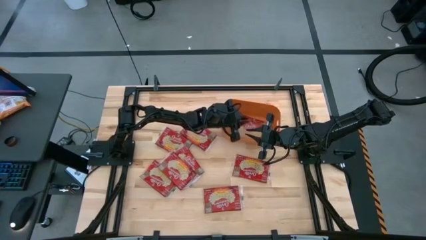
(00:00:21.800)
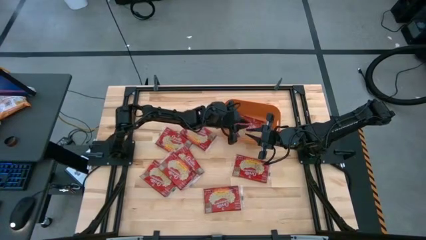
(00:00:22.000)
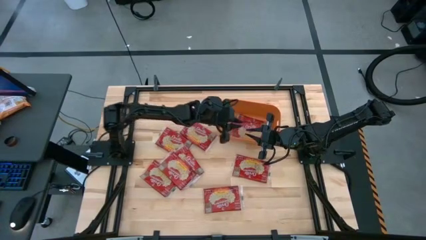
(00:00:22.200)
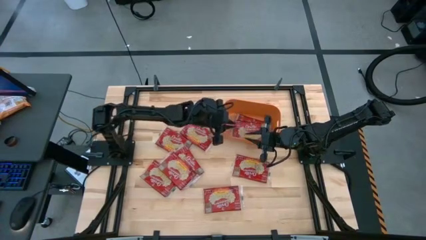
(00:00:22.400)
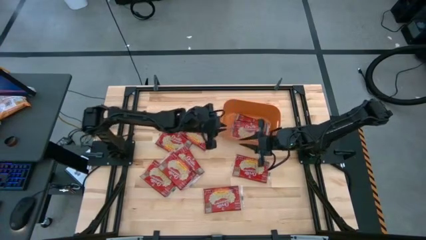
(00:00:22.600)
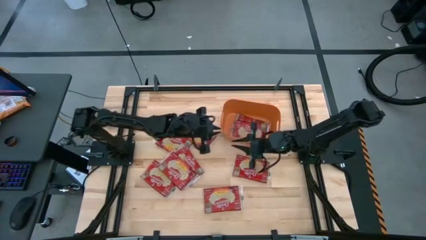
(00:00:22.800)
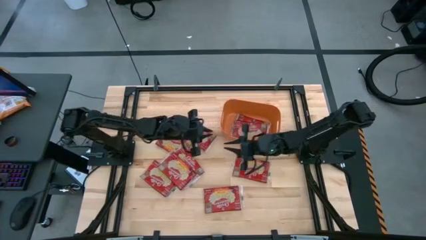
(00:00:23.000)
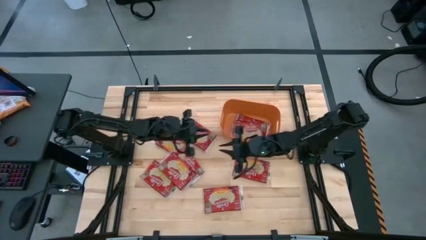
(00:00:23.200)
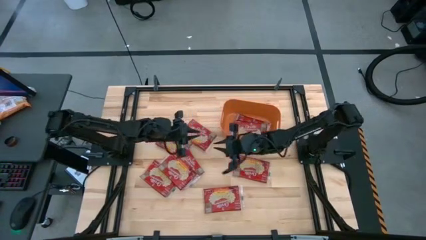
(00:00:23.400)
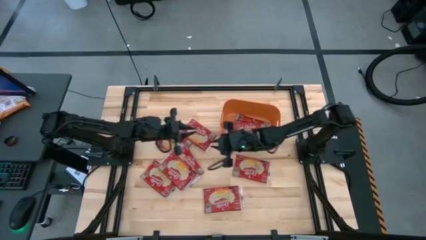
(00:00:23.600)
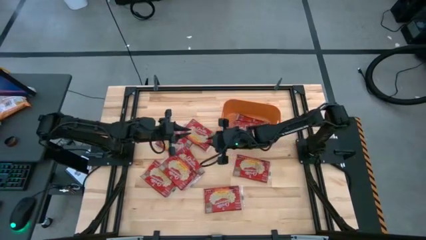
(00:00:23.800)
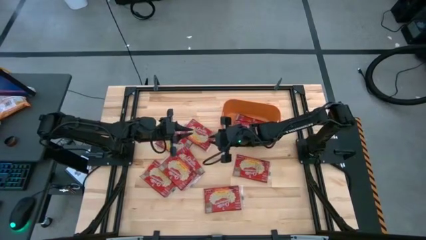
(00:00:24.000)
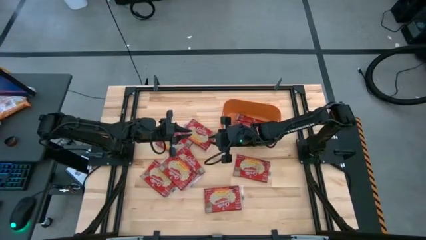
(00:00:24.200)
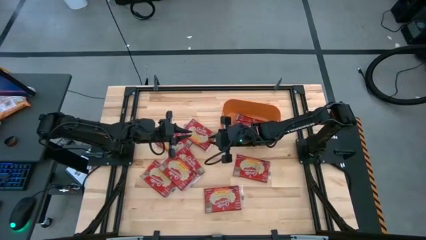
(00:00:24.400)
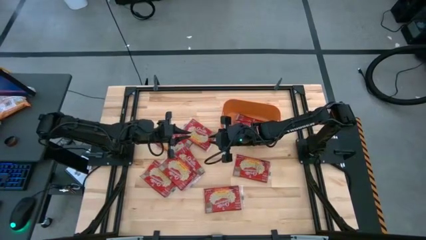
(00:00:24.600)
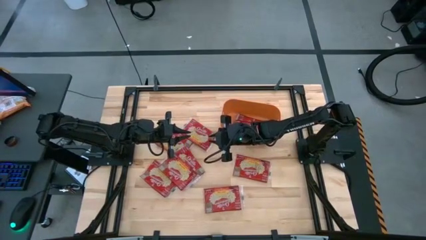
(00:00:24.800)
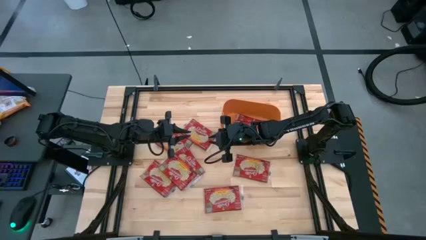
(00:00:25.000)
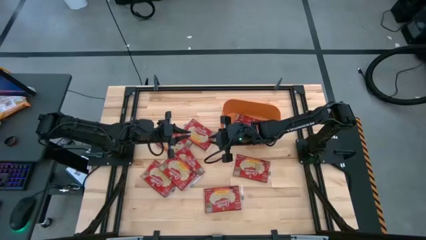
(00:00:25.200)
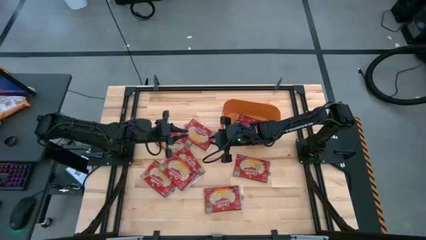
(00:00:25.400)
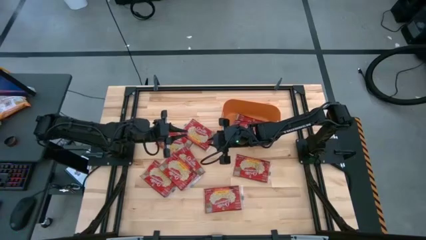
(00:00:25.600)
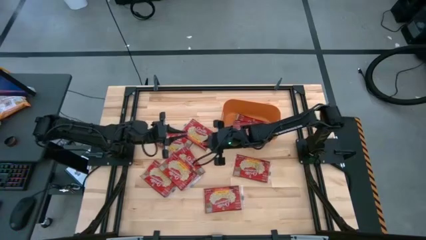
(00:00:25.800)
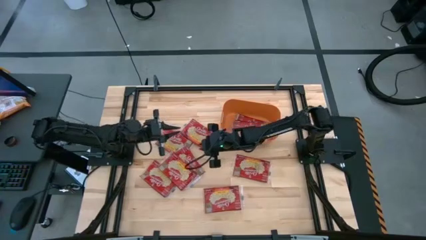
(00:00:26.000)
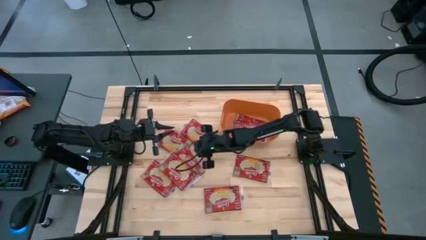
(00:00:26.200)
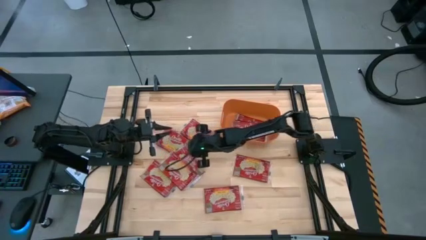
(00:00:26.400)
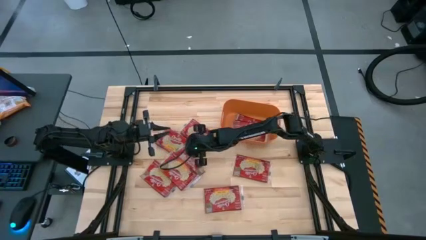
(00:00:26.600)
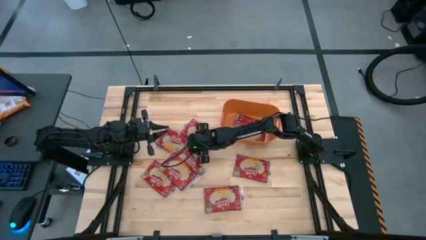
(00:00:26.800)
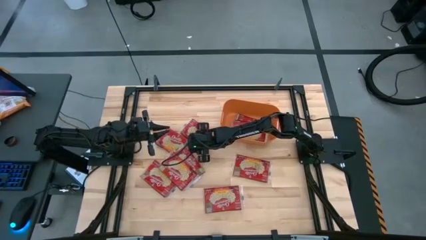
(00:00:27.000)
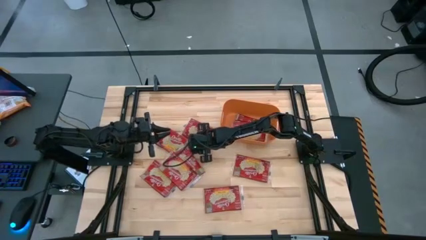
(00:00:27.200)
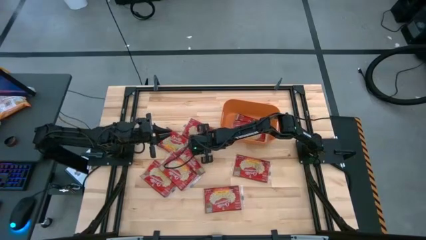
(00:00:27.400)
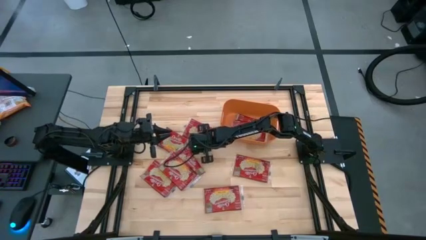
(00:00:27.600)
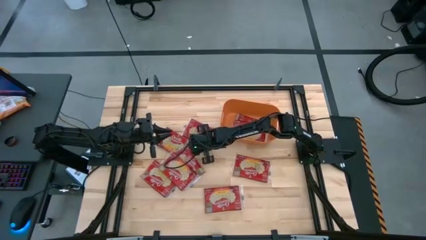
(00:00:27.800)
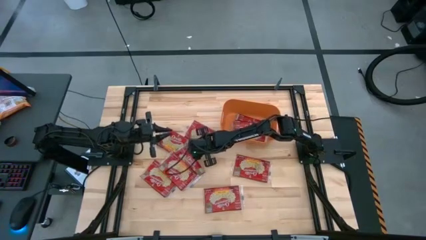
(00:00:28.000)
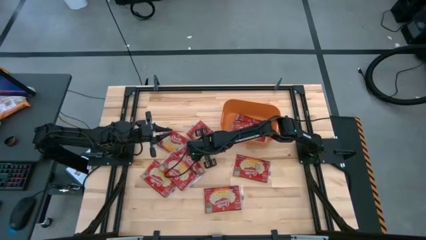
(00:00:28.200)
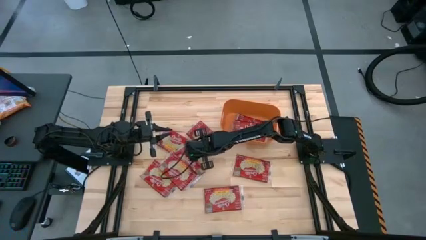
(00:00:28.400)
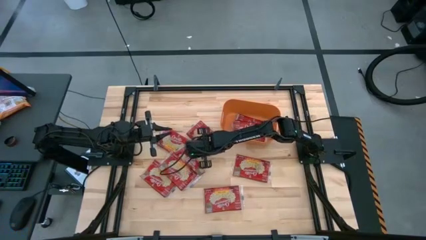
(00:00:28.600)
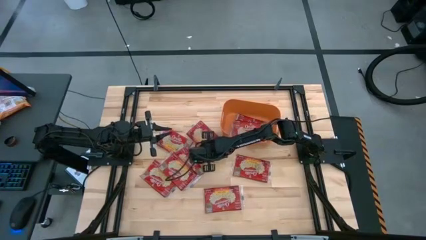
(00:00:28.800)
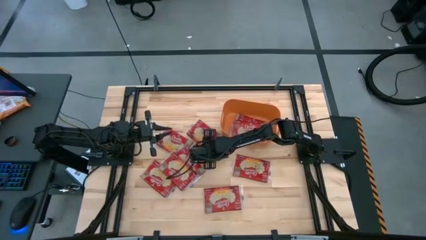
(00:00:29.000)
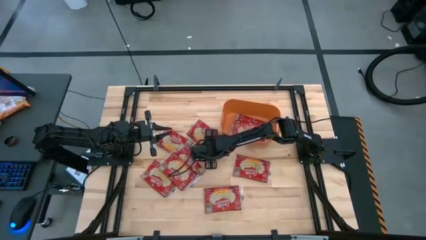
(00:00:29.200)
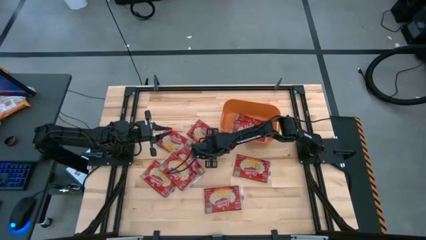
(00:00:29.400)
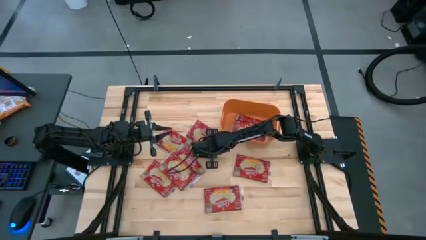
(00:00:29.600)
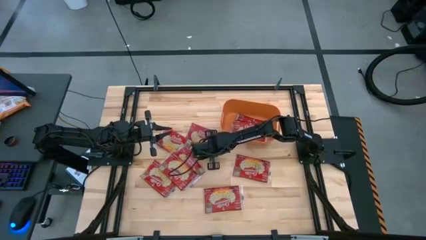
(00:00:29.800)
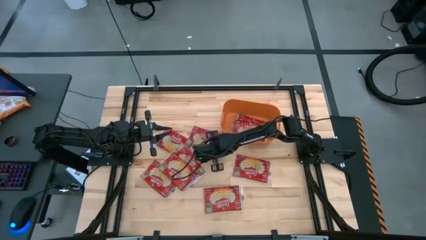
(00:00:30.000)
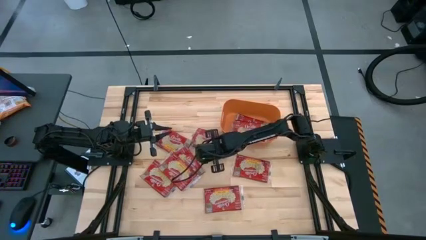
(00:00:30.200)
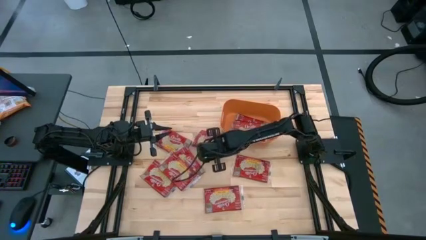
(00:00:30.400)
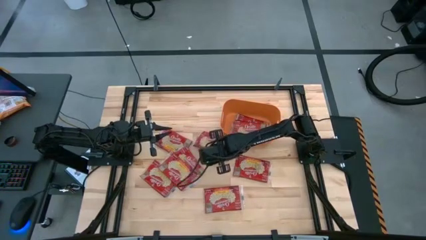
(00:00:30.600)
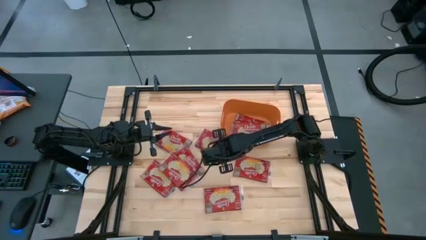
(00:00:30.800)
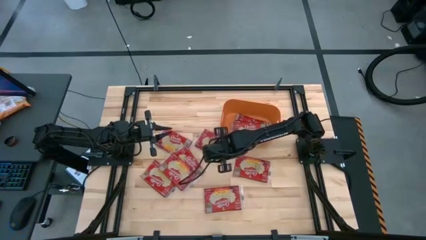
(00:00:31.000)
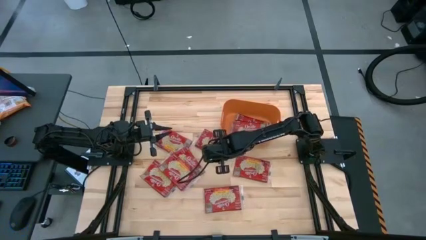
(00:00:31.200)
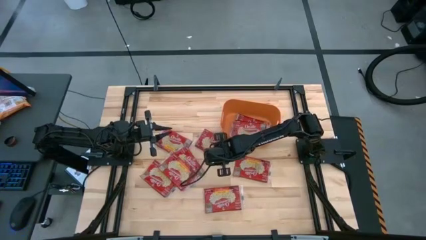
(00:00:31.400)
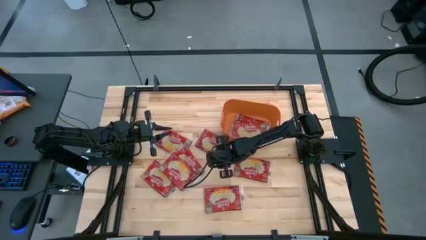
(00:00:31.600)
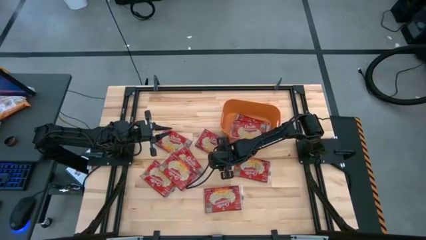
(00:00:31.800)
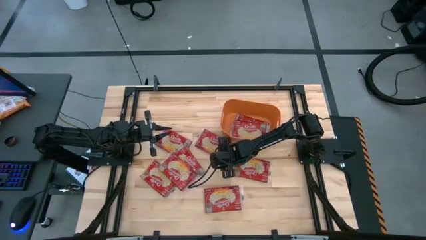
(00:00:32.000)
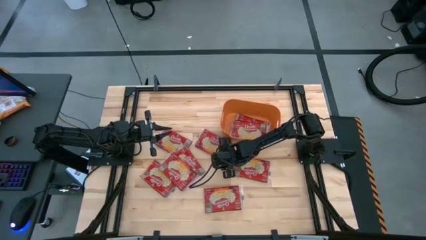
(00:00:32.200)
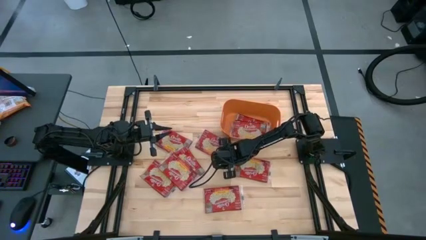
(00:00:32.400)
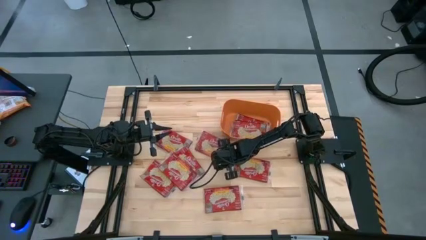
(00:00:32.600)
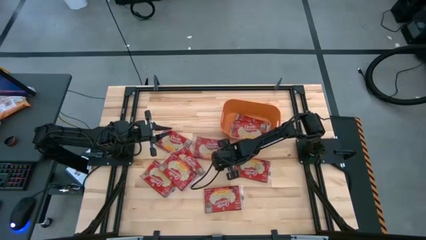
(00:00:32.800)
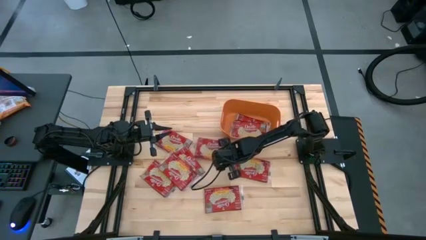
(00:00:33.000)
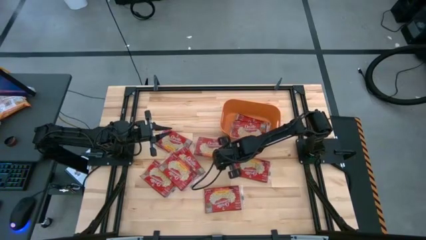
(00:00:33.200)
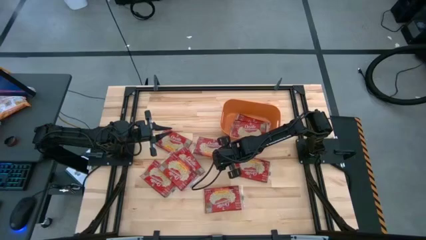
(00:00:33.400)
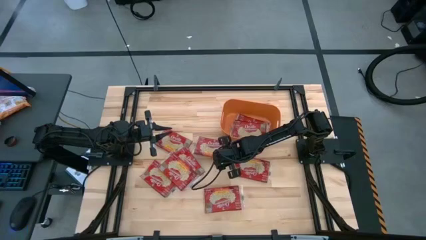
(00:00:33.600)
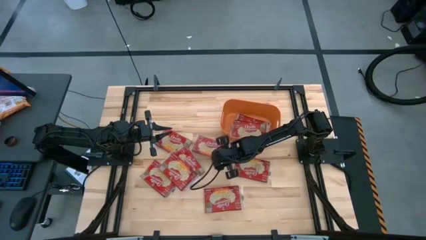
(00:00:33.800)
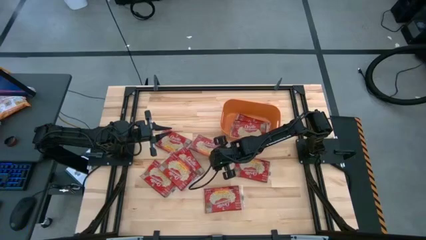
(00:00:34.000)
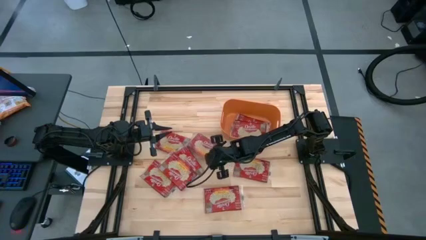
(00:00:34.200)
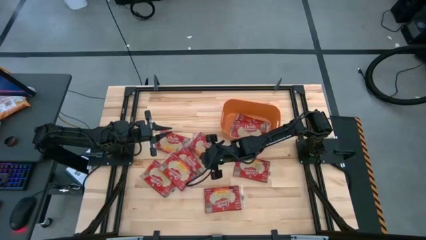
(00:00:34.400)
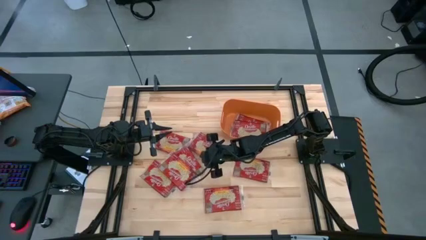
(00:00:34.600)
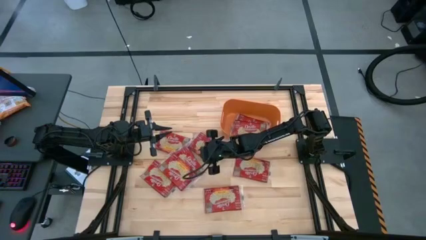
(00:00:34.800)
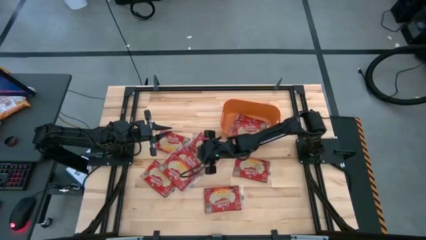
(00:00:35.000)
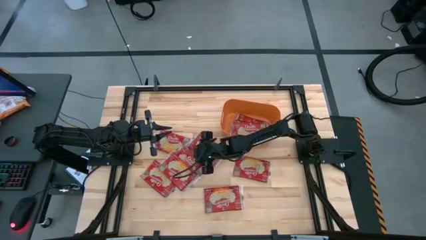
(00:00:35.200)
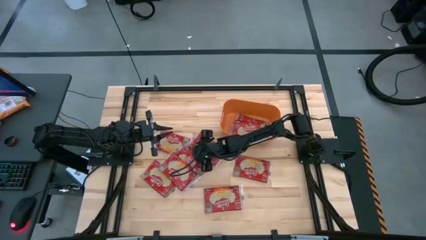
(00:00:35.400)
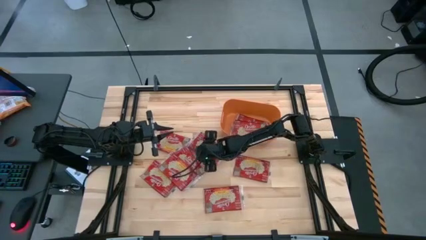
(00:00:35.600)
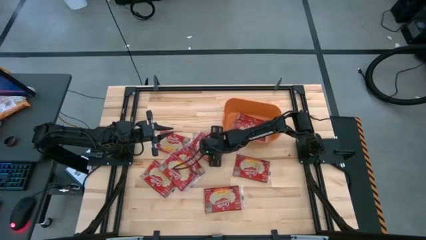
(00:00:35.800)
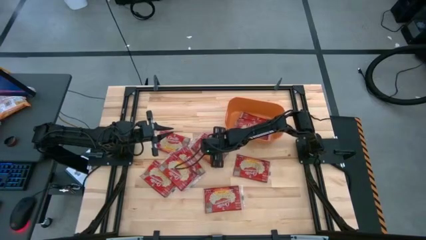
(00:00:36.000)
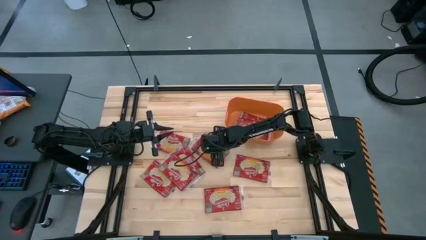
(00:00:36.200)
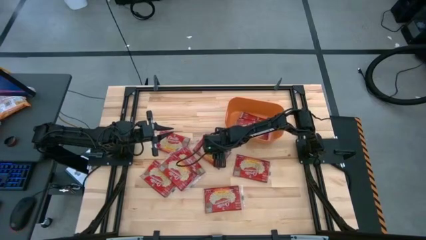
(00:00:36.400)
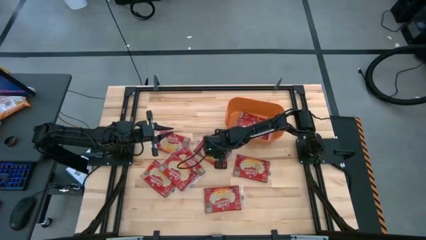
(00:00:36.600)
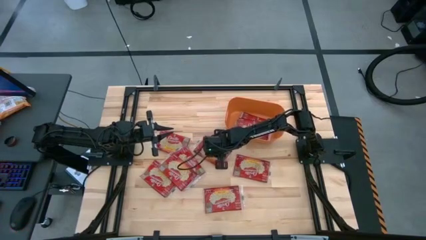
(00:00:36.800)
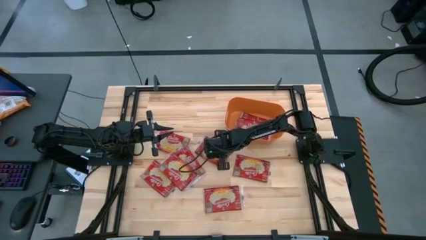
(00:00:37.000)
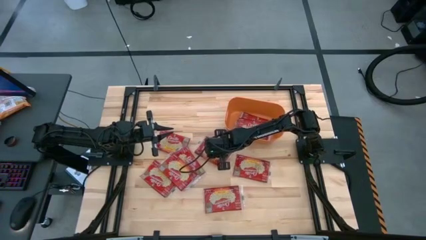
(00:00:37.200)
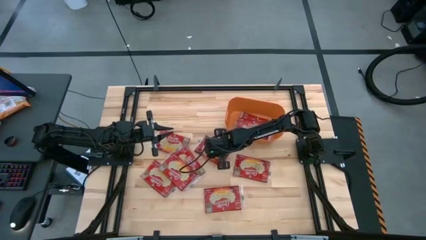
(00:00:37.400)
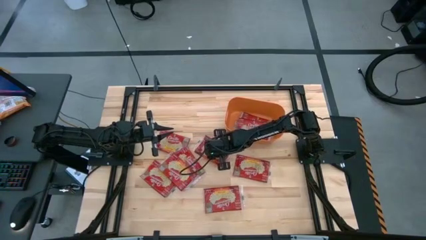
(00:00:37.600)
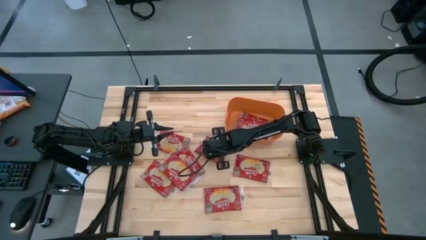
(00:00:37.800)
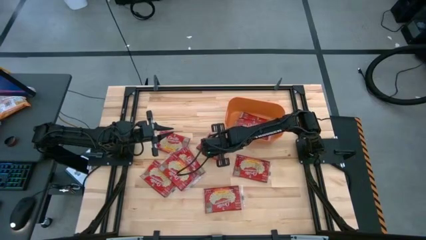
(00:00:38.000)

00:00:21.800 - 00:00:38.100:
Task: Sort popcorn bags into baskets
Put the popcorn bag into the orange bin
